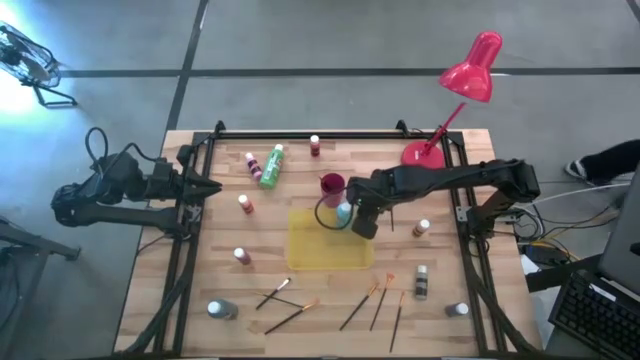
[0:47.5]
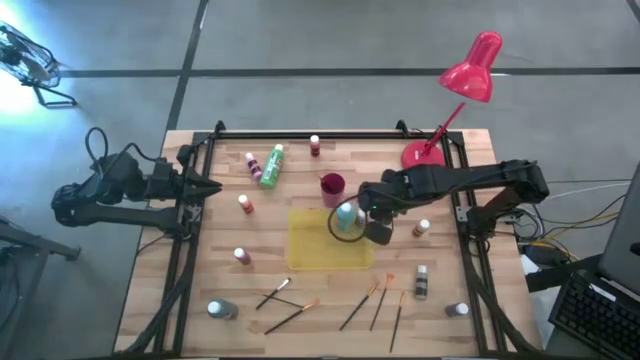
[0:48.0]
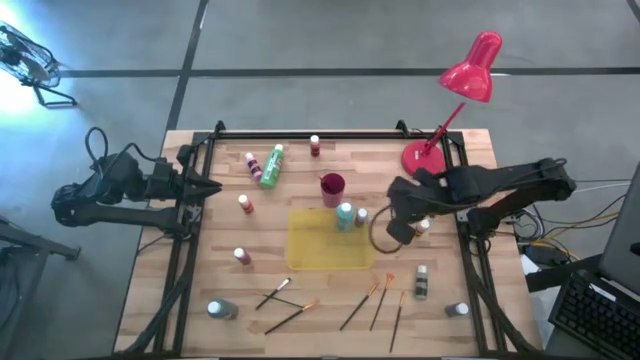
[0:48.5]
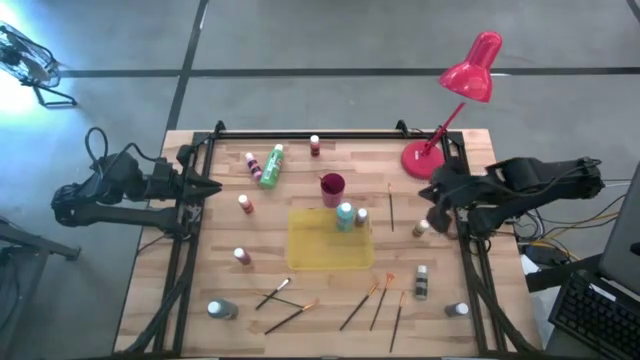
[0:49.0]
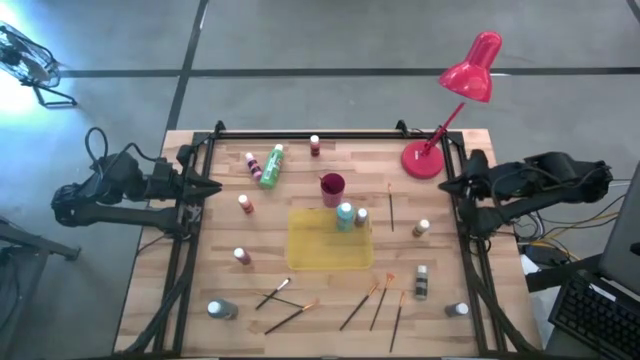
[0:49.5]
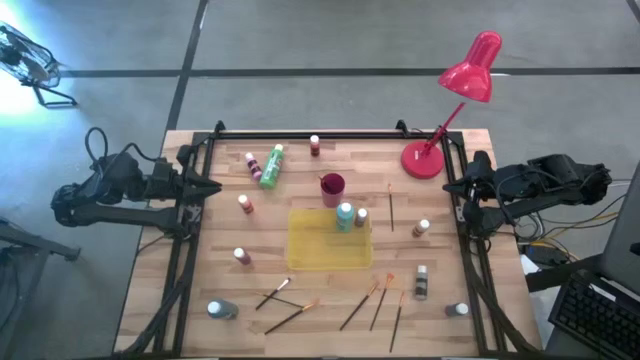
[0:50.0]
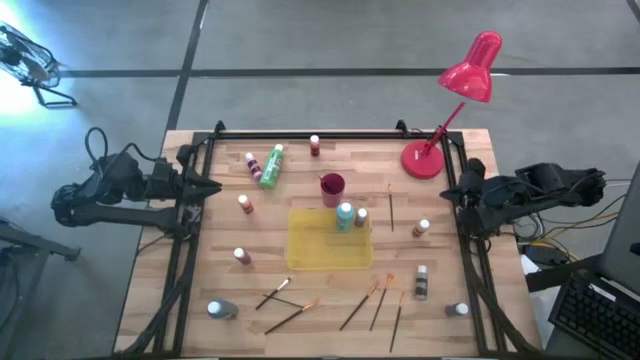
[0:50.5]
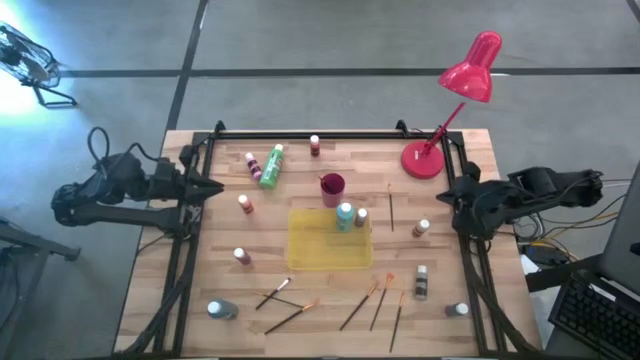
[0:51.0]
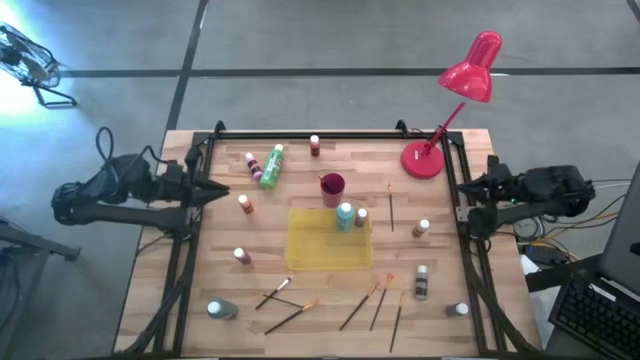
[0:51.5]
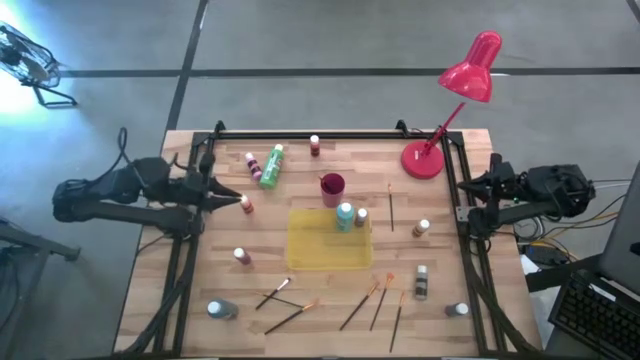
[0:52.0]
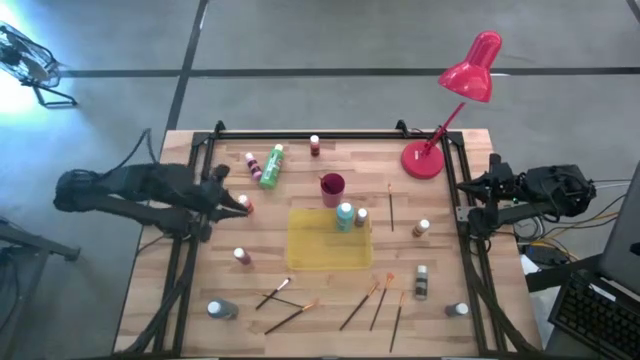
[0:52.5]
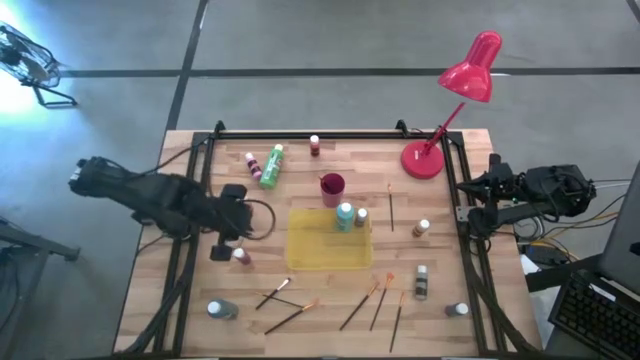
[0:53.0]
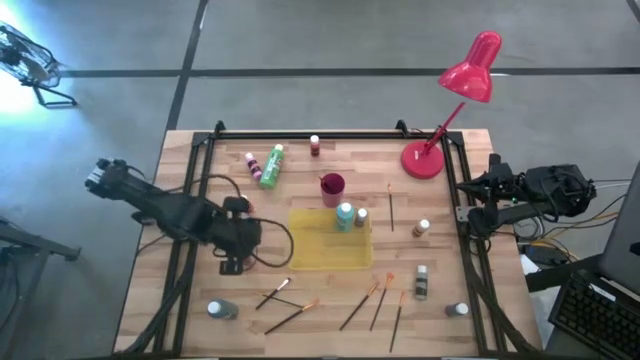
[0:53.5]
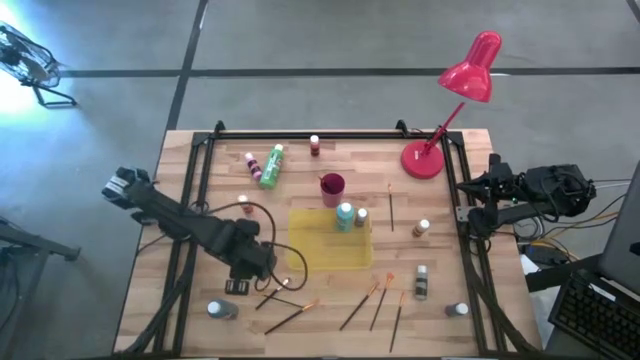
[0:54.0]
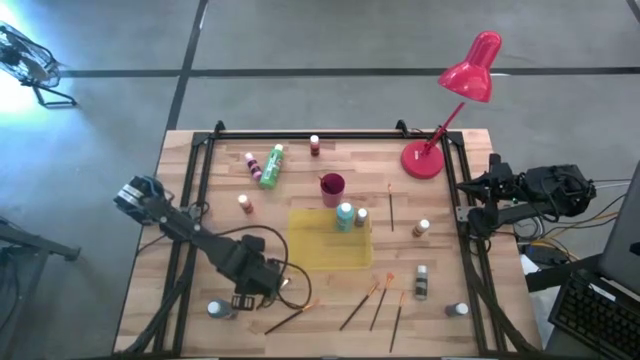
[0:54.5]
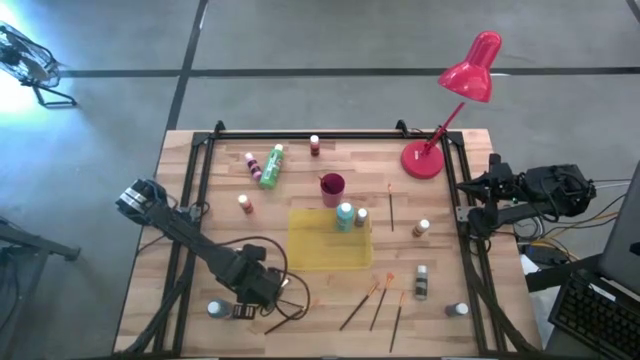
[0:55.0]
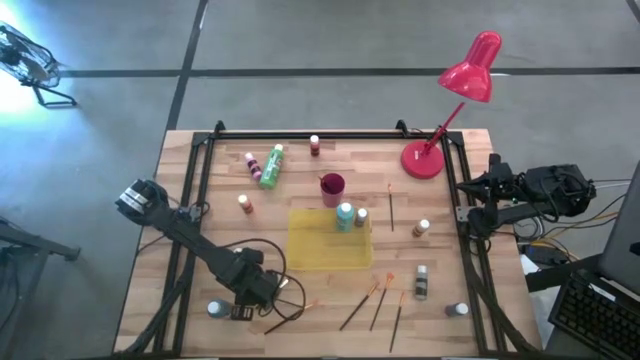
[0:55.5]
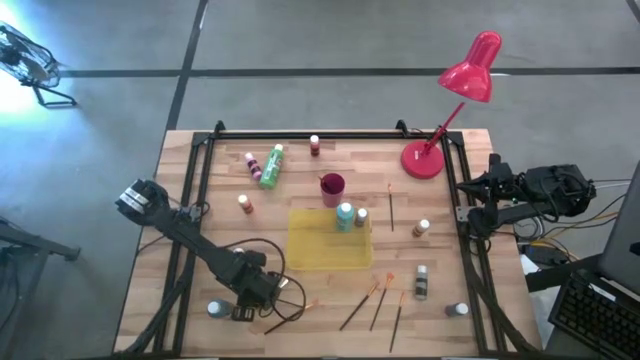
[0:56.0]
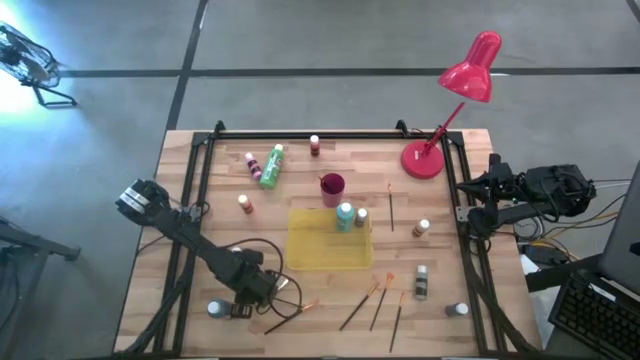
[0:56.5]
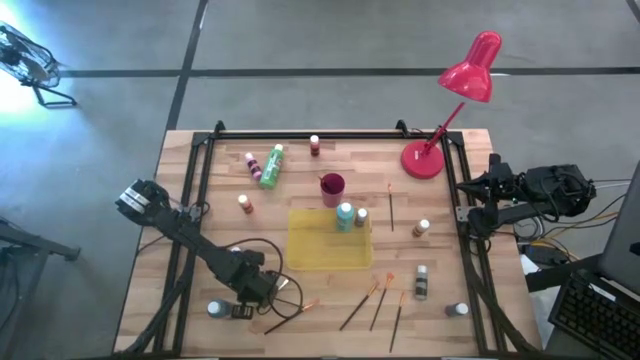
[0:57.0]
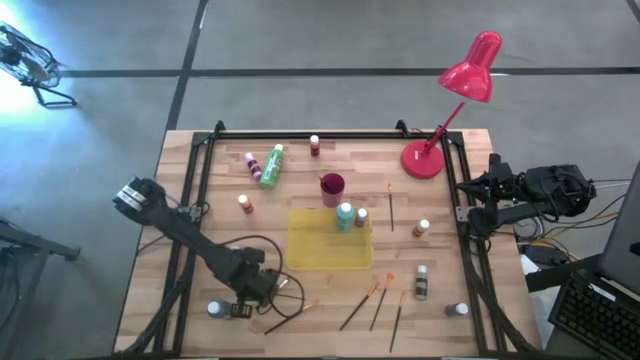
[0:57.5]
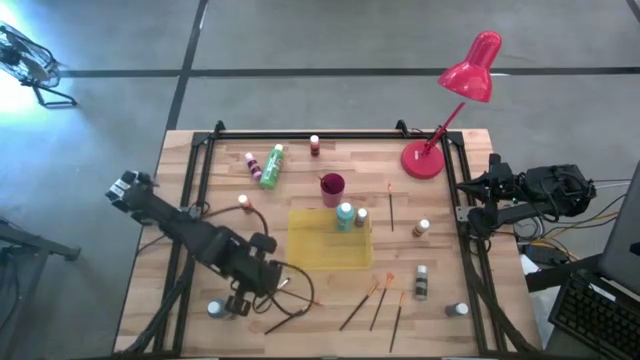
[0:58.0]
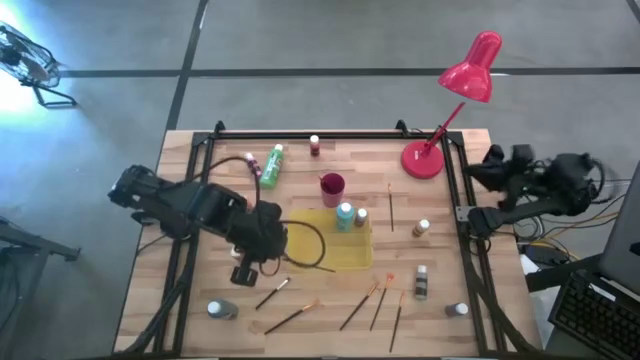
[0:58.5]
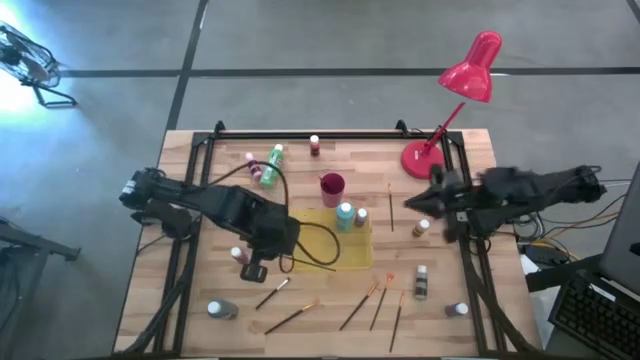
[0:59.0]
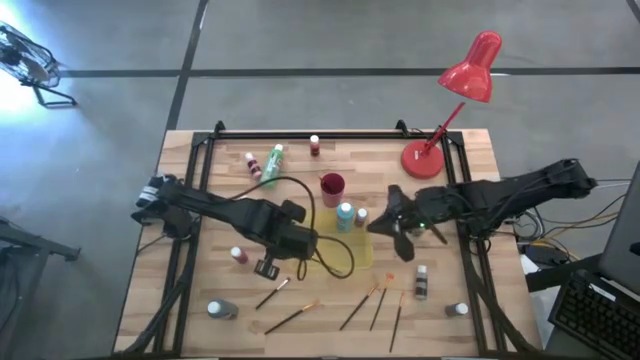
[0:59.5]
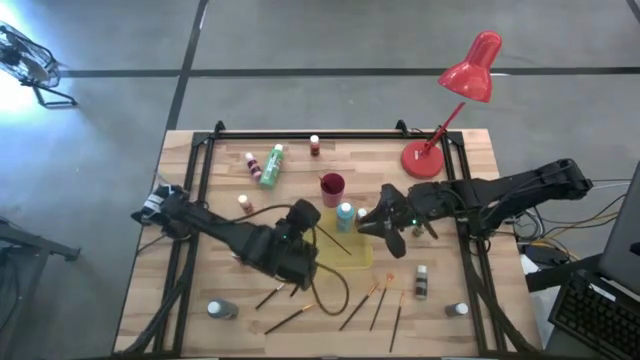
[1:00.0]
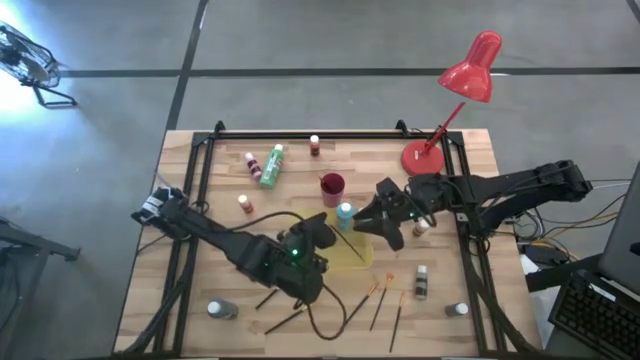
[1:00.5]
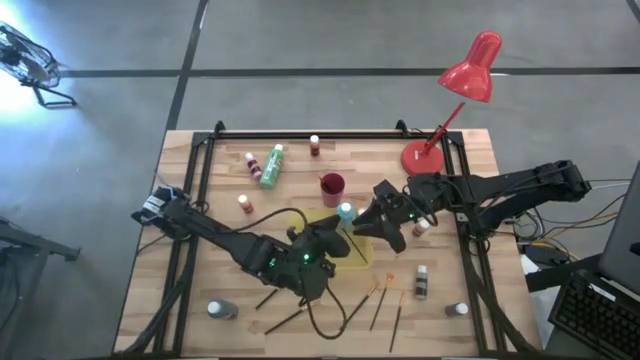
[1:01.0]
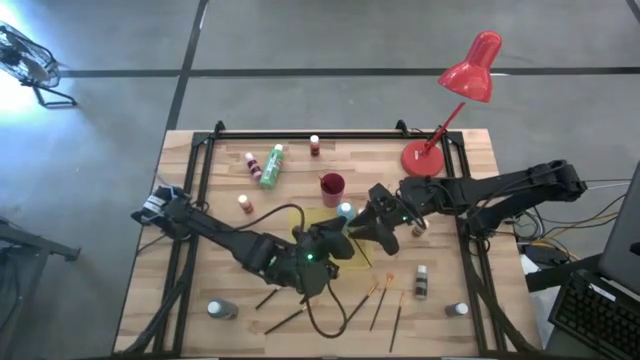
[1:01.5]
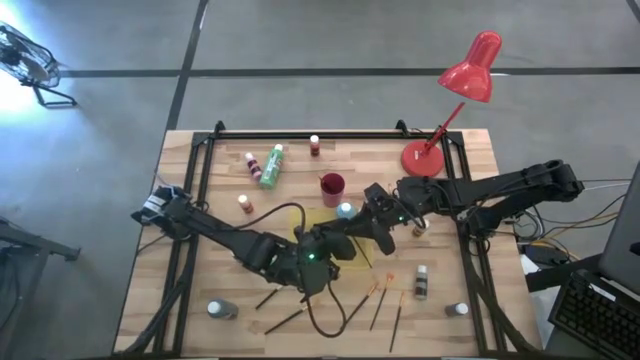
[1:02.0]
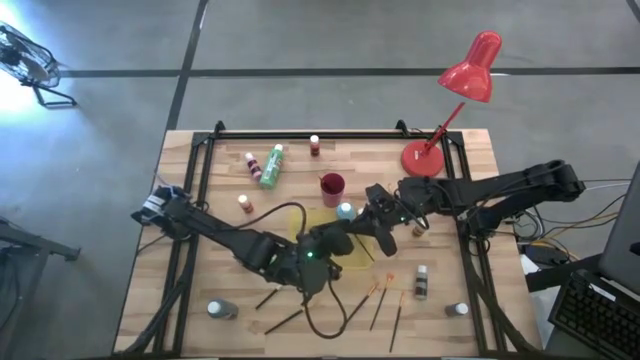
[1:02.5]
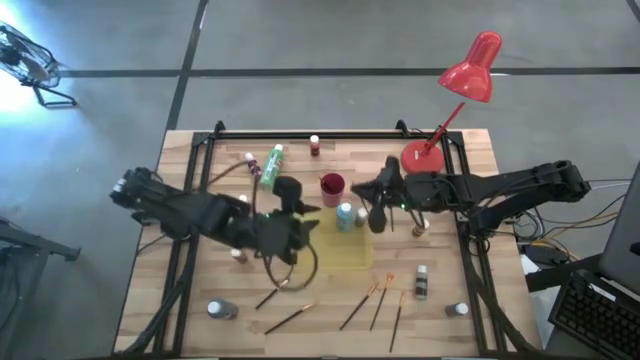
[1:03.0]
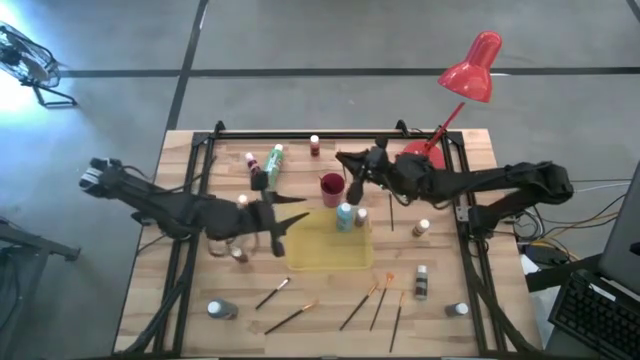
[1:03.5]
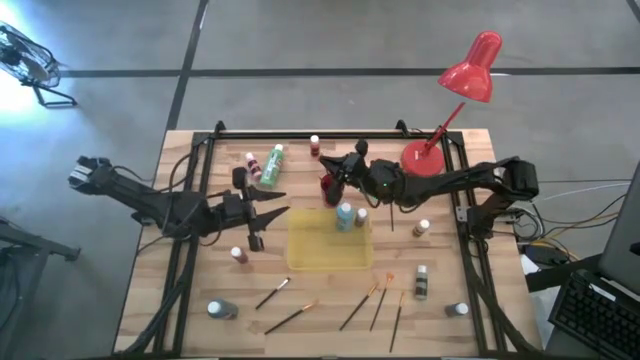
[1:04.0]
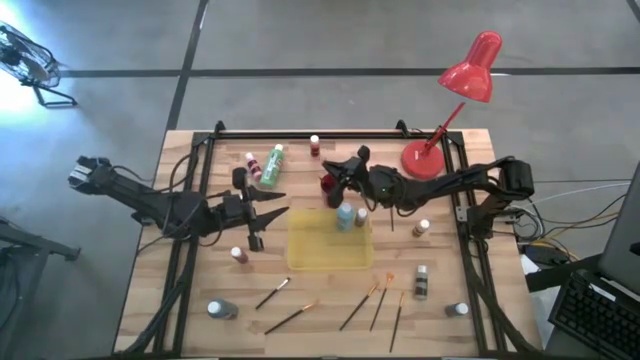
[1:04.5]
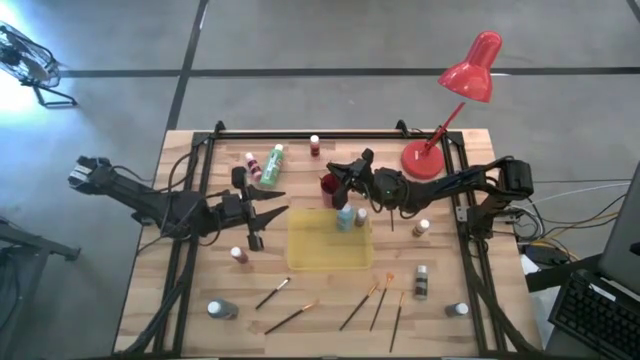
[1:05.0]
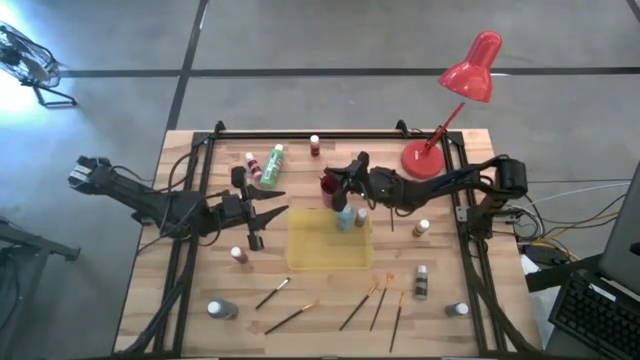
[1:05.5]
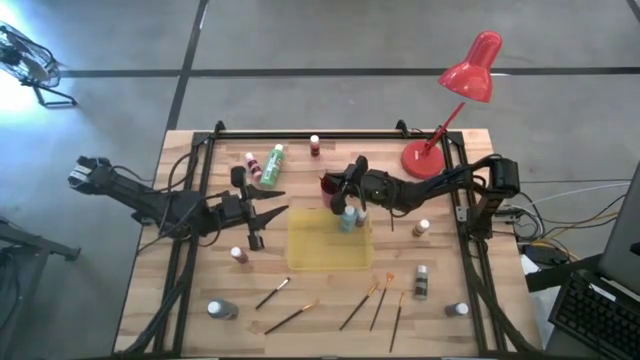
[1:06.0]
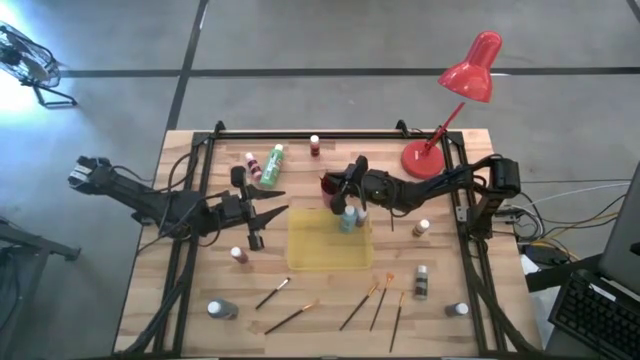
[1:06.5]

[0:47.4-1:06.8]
Task: Pick & Place Paint Supplies
Put the gold paint brush into the pink cup

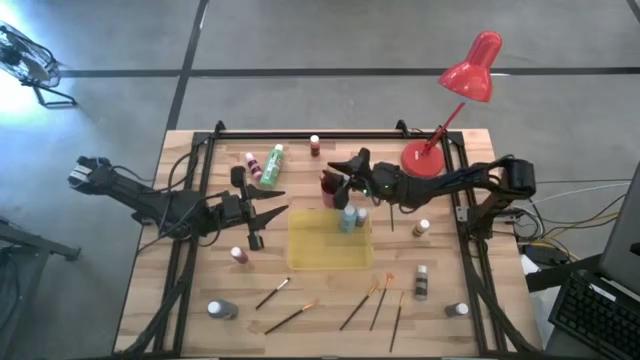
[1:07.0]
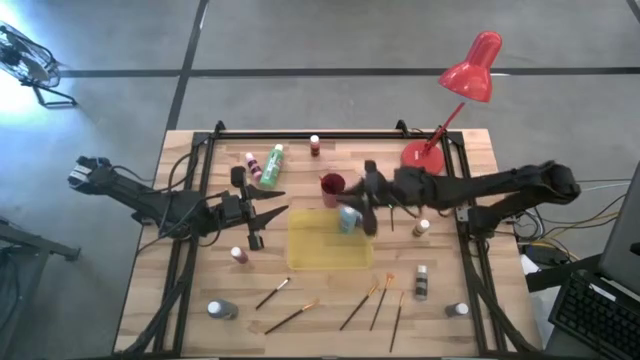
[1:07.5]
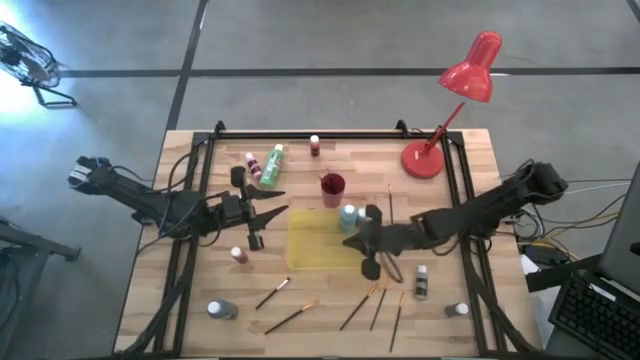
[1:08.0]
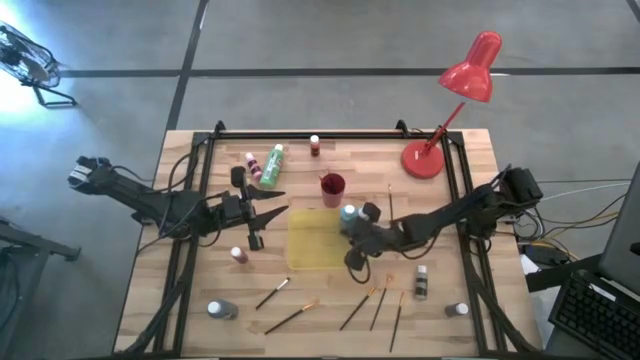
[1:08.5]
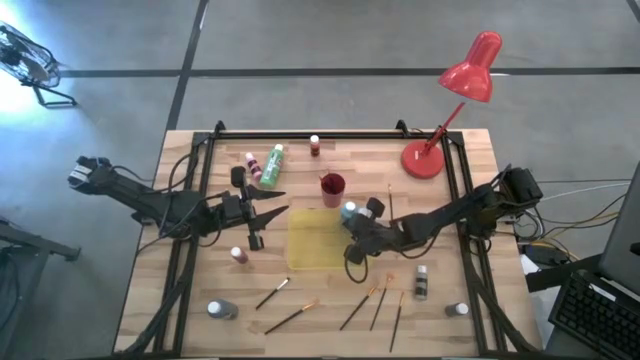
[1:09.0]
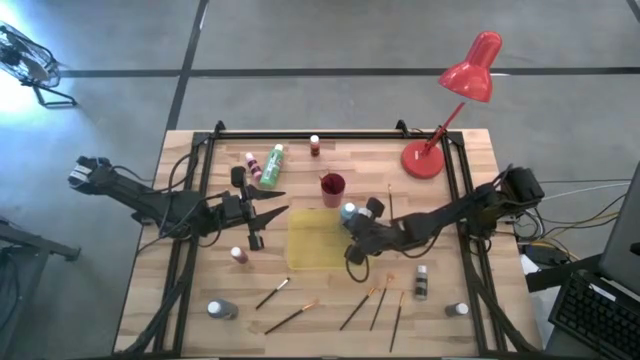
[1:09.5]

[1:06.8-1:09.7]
Adjust the large light blue paint bottle in the yellow bin
